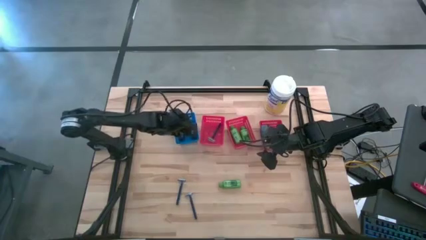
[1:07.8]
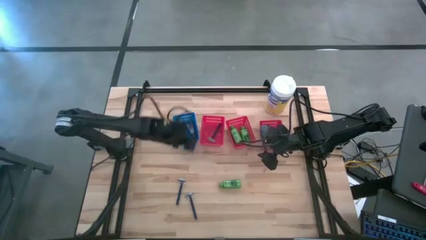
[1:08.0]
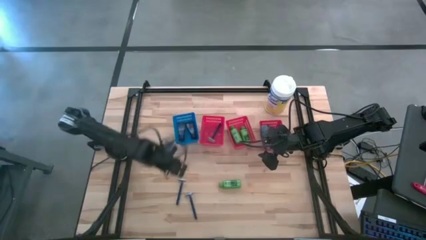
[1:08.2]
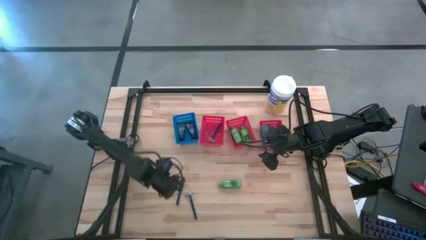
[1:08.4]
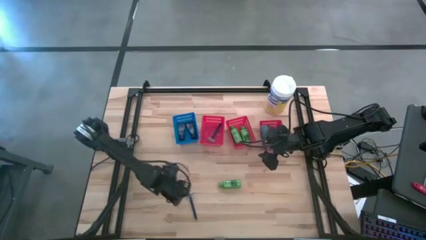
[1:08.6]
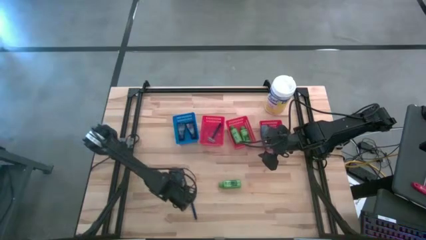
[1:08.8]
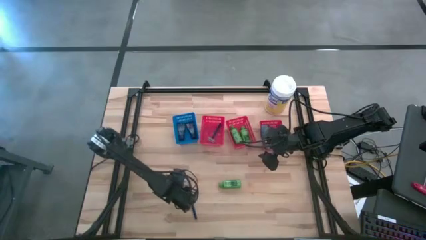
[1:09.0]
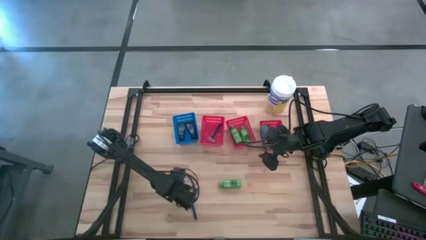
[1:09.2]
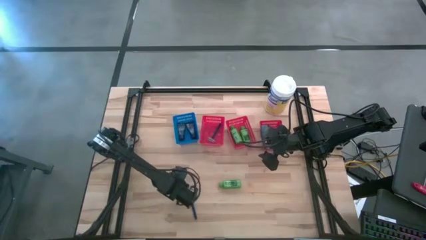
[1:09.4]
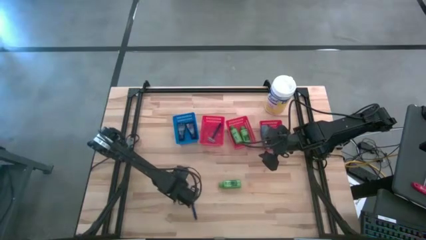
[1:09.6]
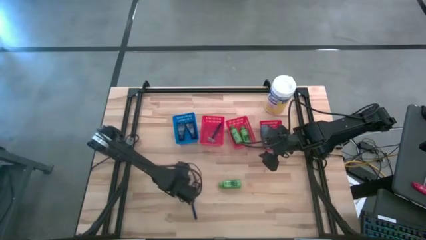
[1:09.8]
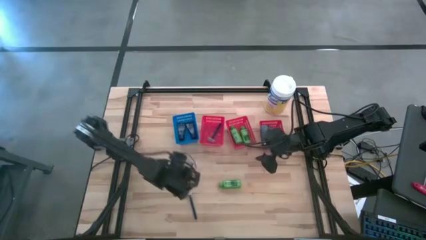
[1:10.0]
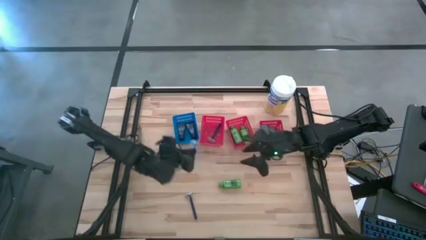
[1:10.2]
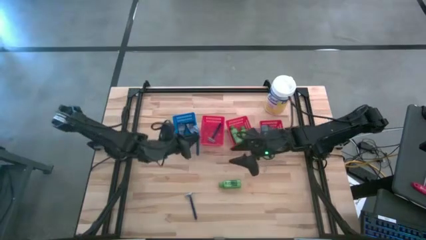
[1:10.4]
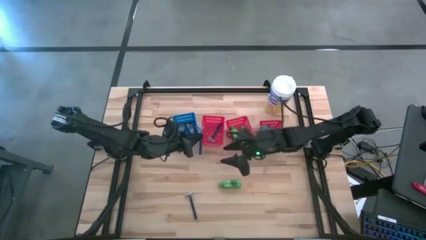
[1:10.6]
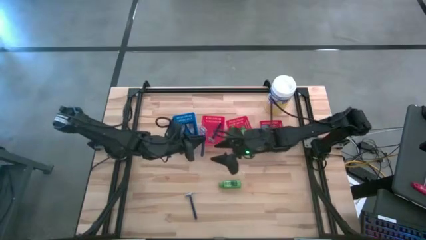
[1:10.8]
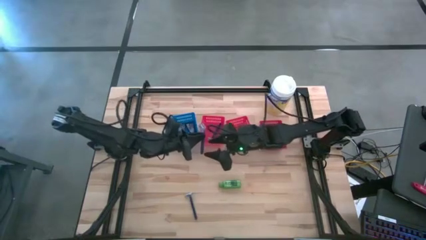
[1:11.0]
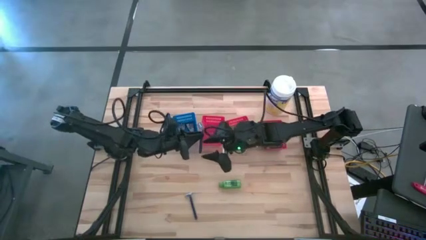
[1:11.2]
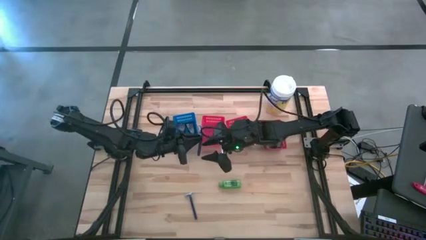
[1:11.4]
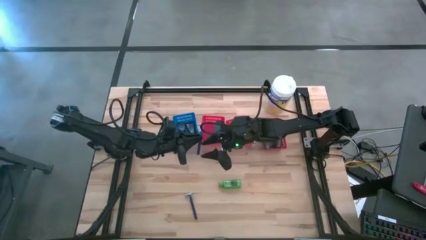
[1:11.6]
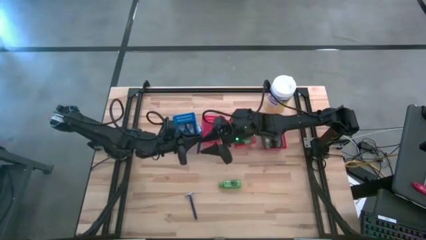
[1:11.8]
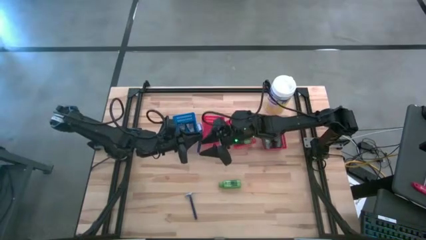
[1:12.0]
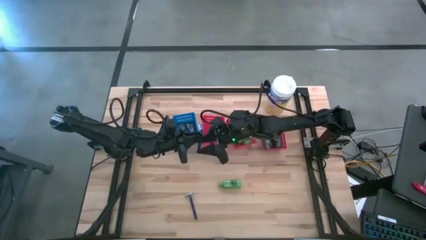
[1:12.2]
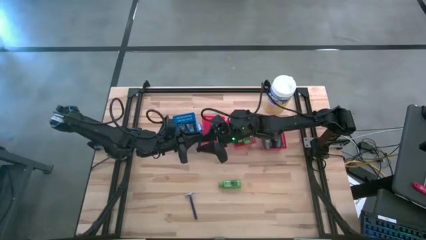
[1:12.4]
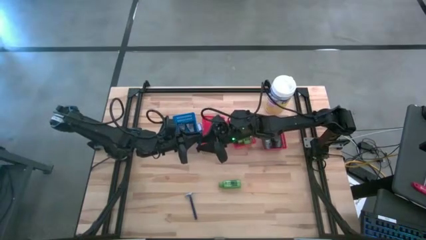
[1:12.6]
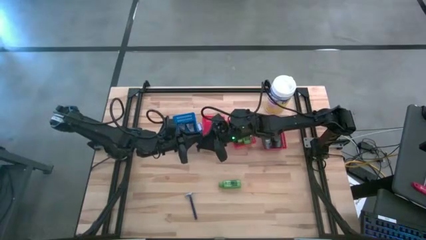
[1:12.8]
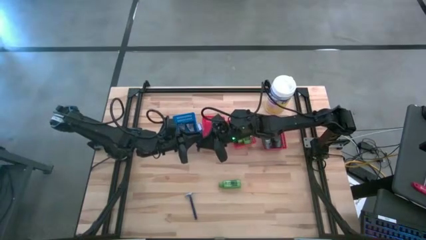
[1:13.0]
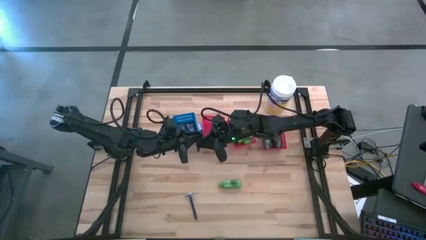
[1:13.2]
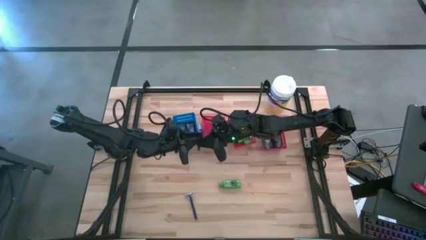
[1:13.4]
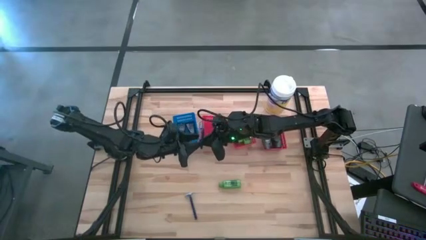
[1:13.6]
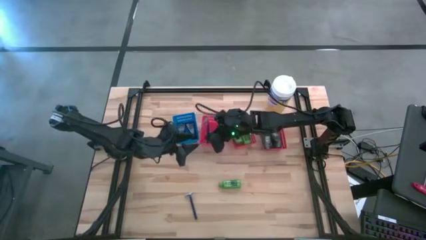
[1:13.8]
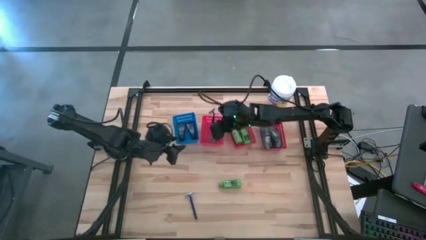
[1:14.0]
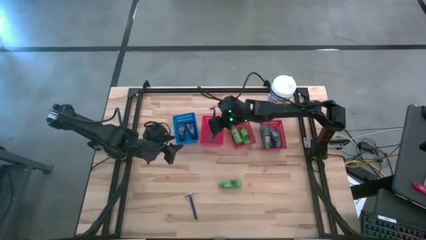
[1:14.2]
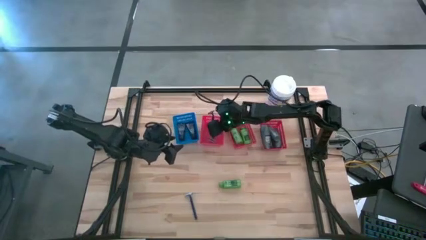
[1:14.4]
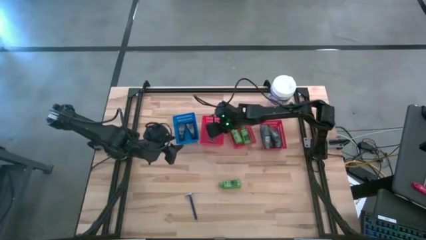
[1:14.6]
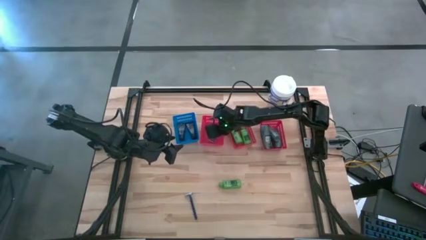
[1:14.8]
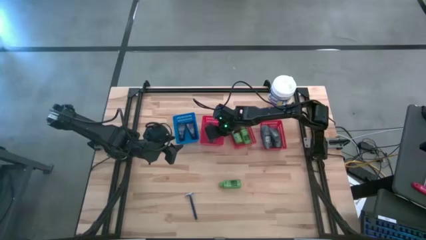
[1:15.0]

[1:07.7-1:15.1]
Task: Pick & Place Travel size toiletries
Put the razor into the left red bin

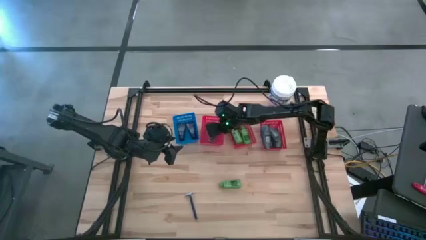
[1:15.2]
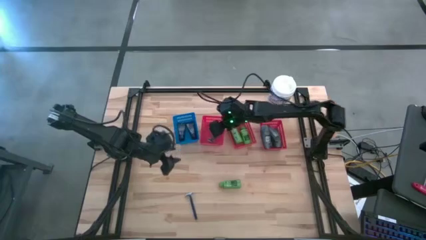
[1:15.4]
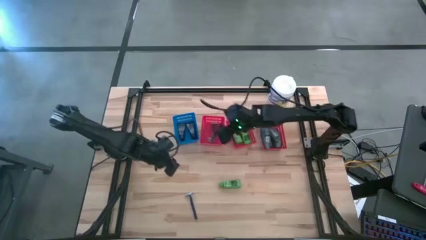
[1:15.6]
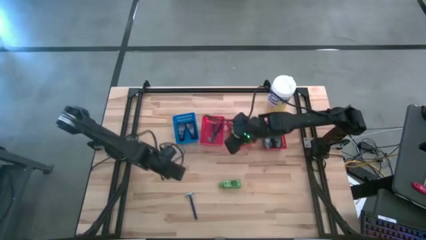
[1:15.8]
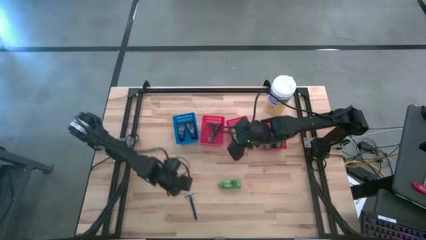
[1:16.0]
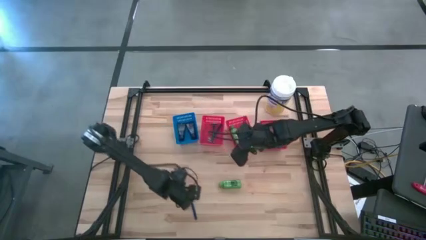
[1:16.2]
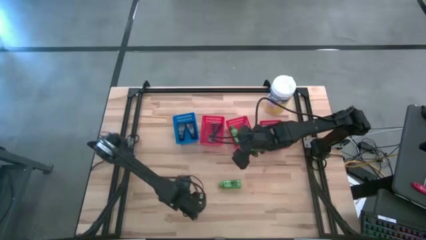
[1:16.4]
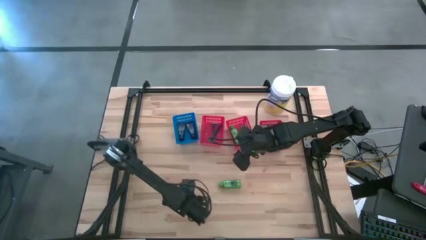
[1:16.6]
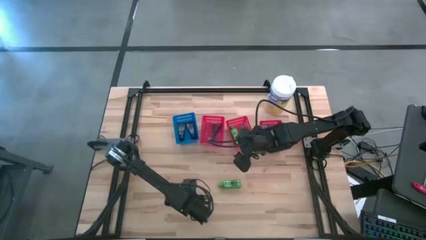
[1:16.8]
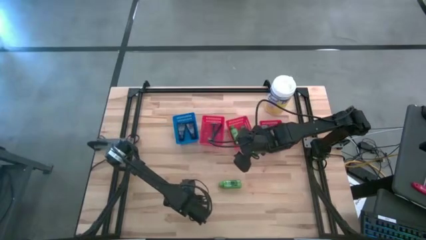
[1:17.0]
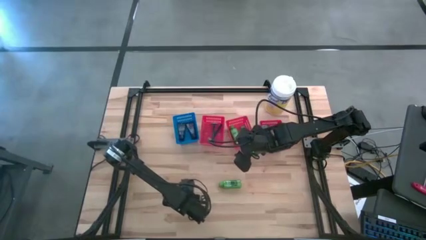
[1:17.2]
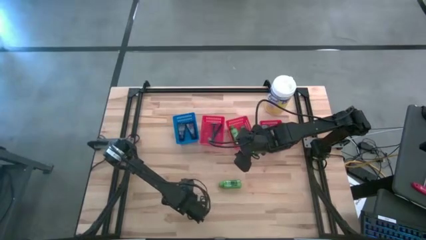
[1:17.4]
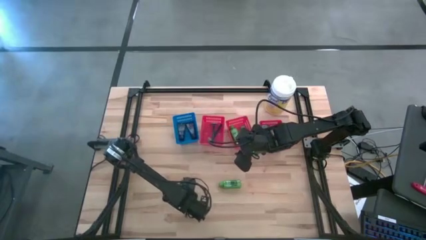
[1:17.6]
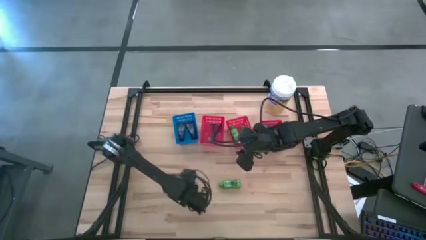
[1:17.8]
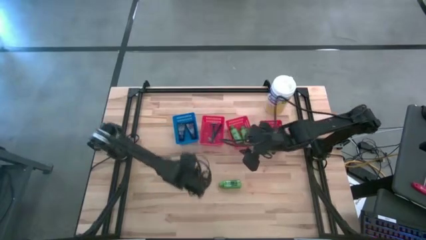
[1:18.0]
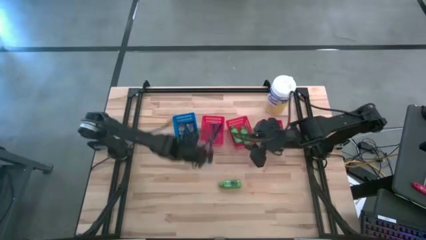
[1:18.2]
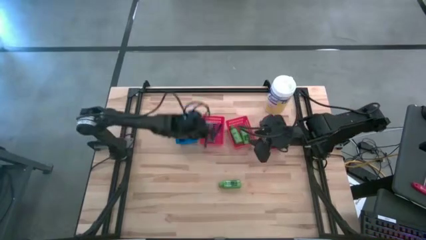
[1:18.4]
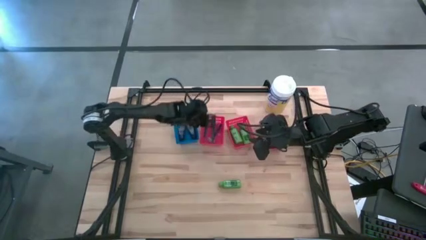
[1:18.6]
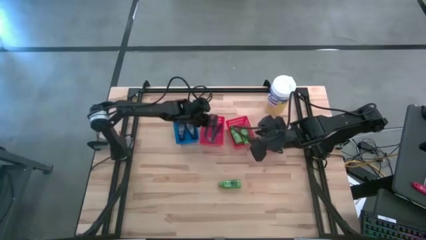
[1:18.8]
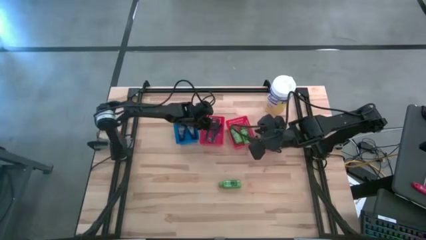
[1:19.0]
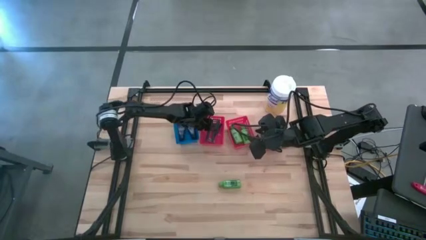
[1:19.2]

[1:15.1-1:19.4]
Put the razor into the left red bin

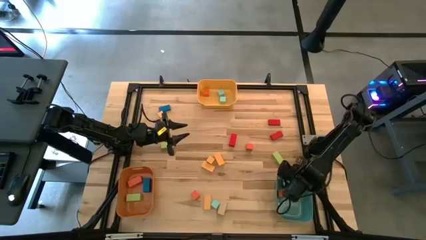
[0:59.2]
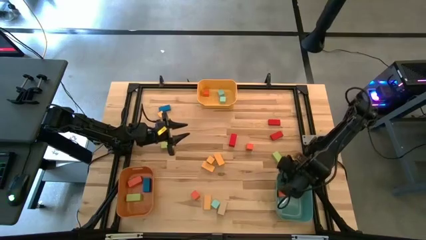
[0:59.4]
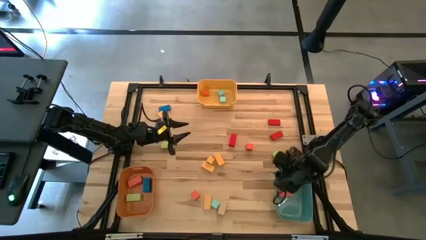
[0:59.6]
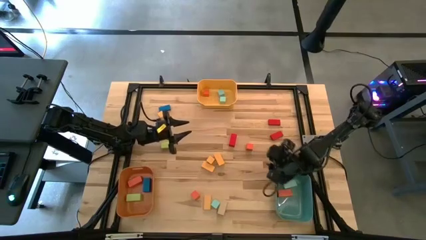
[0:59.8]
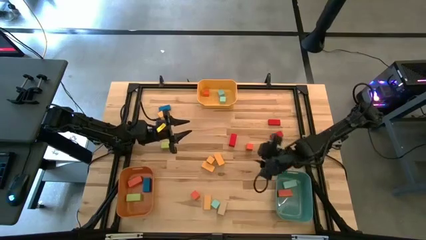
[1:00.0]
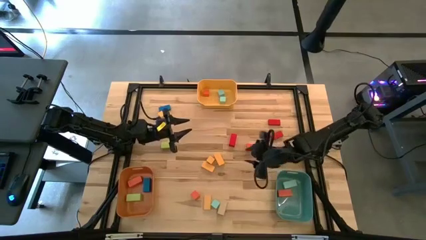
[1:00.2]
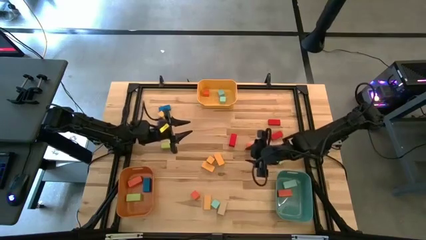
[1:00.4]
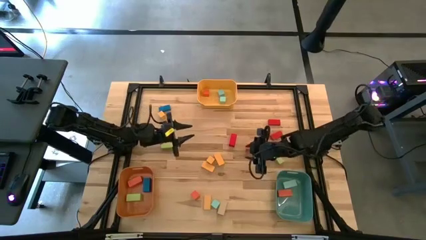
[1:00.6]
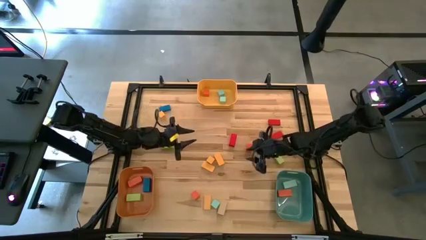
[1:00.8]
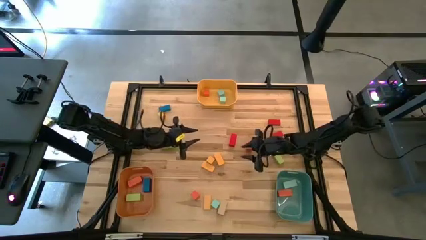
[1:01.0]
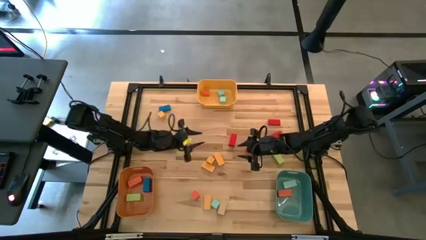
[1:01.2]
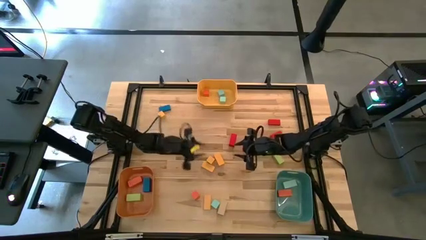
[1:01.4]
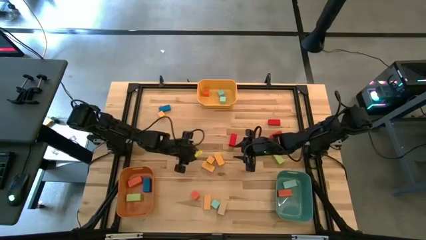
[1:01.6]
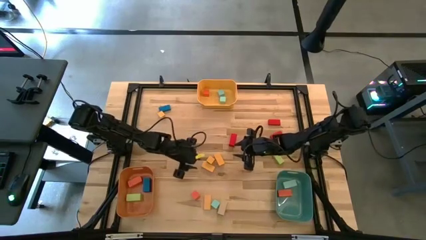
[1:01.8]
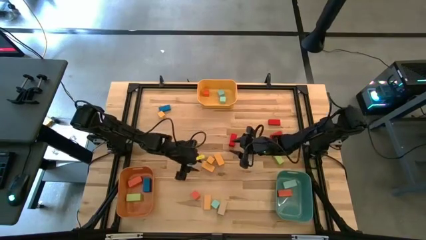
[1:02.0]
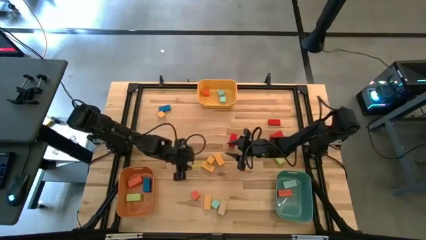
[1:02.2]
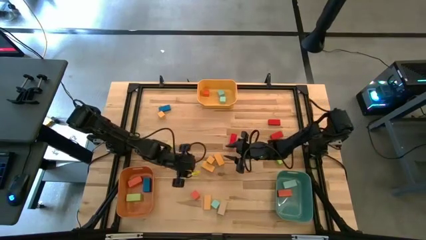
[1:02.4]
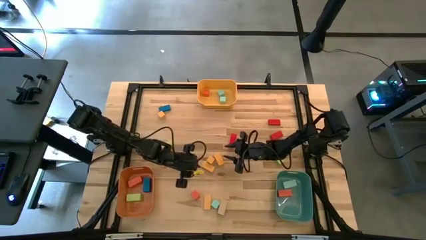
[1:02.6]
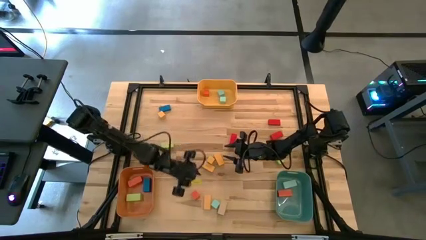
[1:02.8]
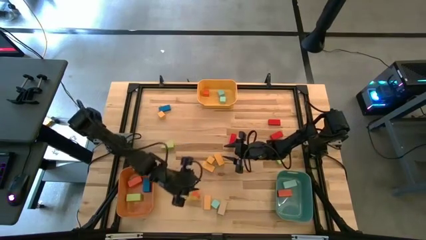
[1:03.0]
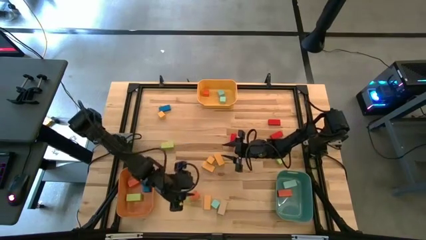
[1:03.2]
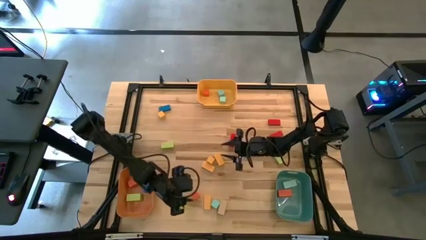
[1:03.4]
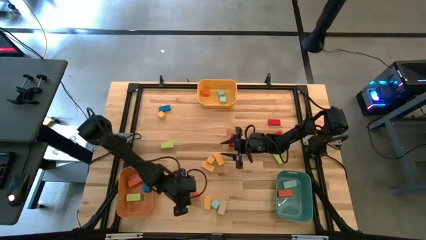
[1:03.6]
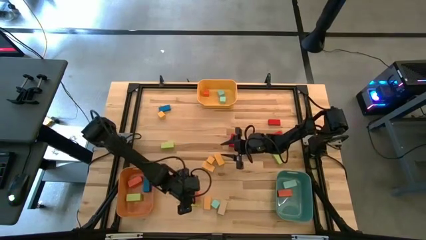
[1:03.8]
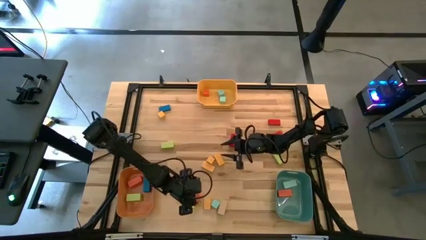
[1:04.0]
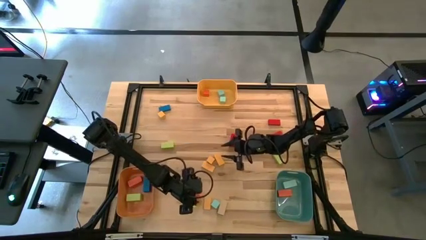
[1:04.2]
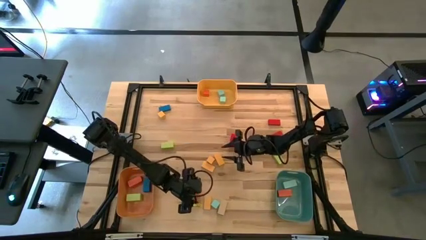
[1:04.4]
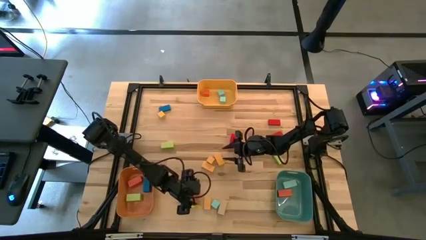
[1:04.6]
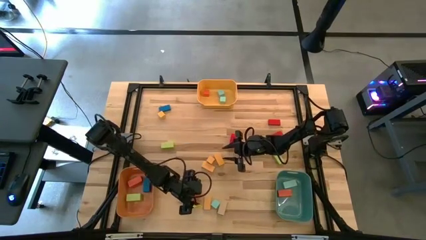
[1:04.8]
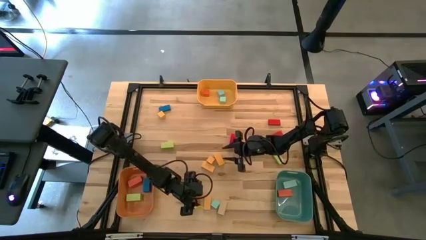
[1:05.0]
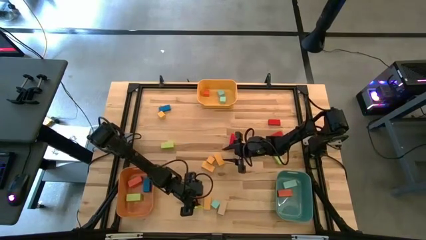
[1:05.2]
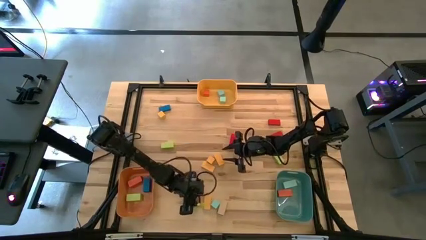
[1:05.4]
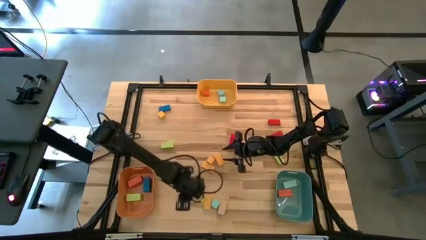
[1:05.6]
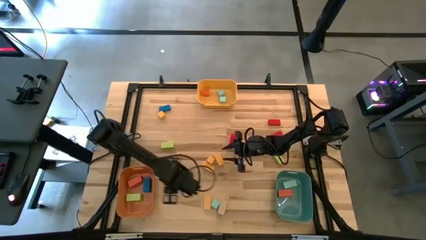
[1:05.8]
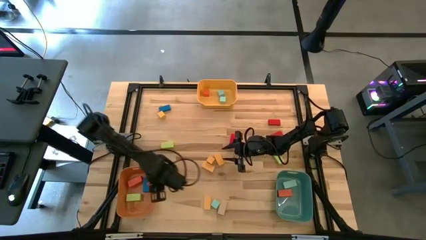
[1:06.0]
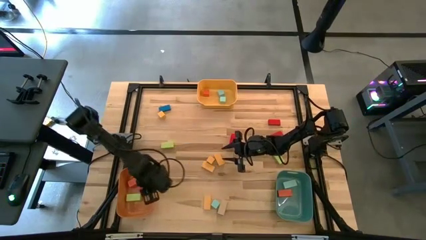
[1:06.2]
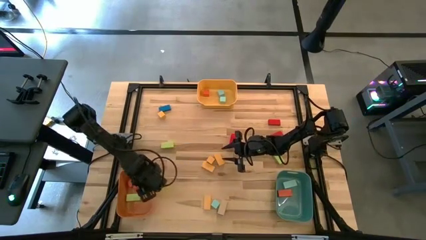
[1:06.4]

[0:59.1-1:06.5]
Task: Sort blocks by size
Put the small orange block into the yellow bin
